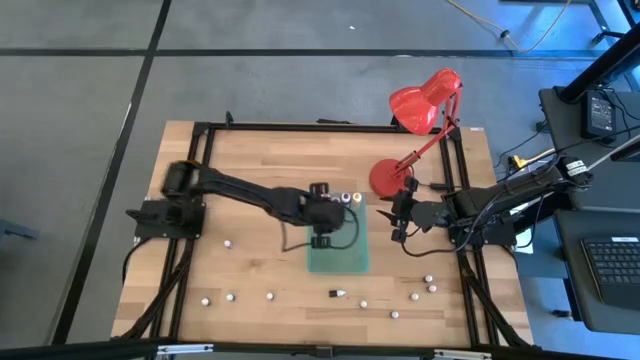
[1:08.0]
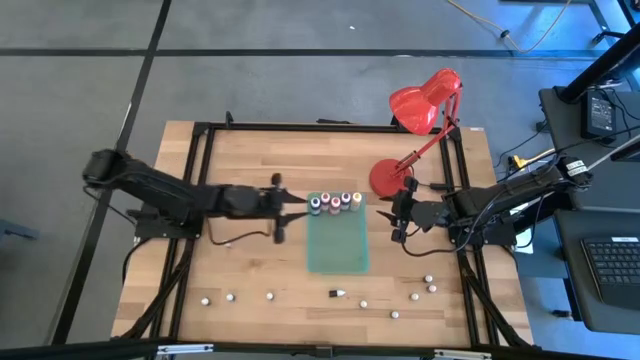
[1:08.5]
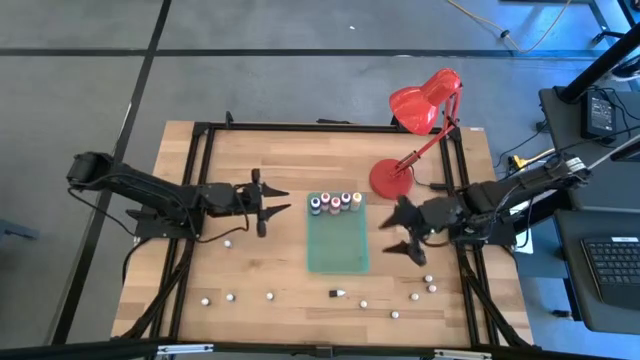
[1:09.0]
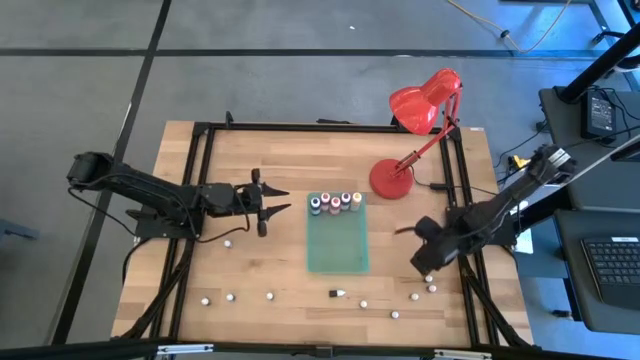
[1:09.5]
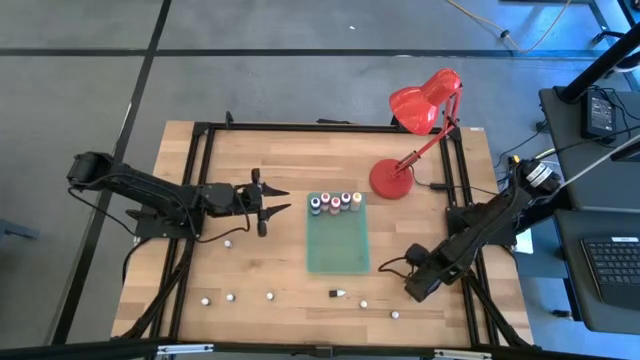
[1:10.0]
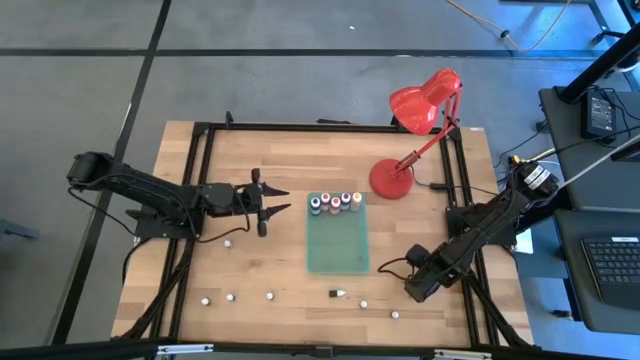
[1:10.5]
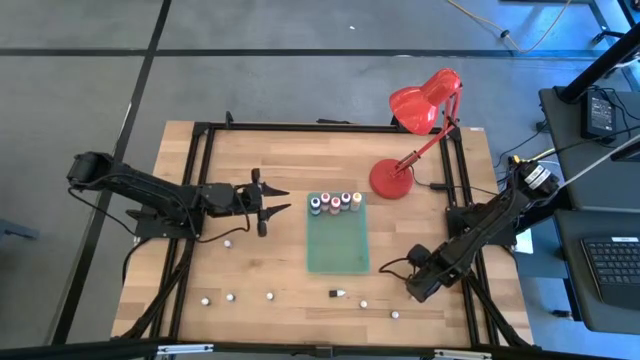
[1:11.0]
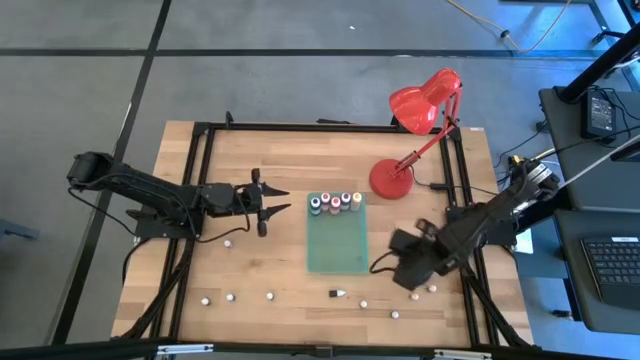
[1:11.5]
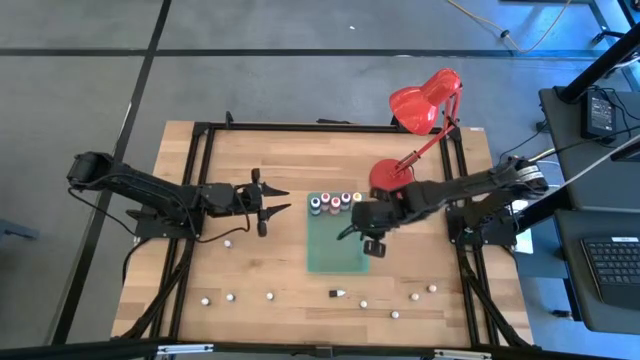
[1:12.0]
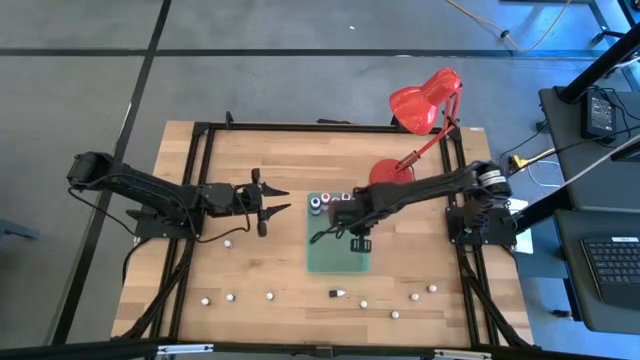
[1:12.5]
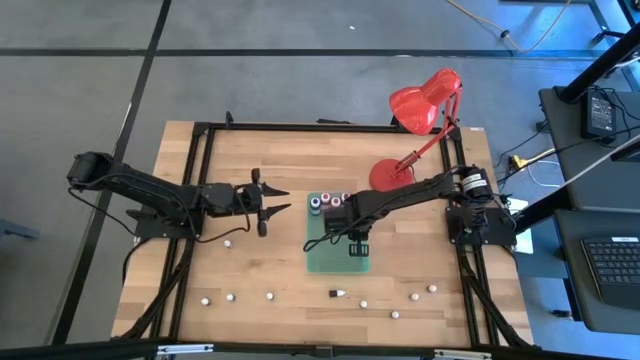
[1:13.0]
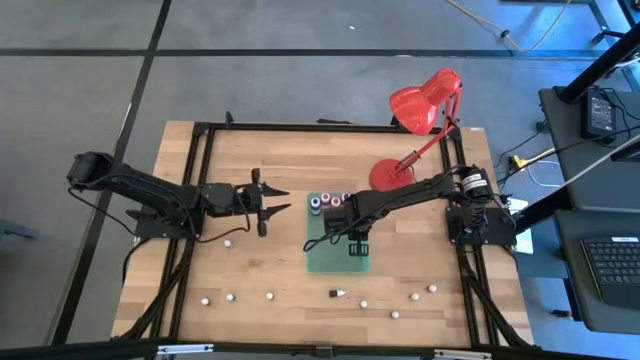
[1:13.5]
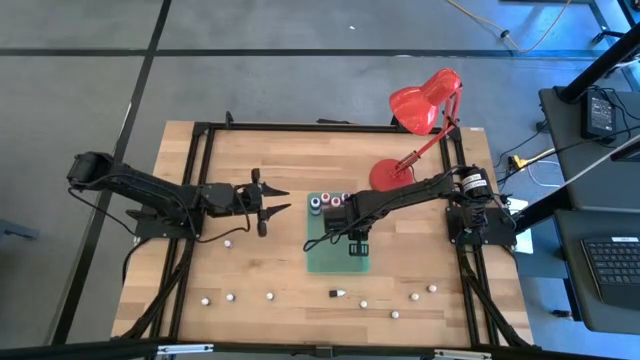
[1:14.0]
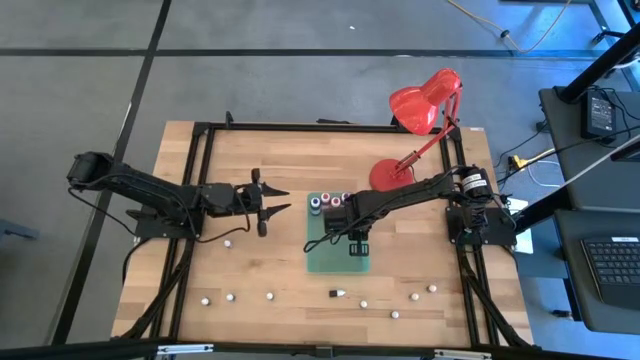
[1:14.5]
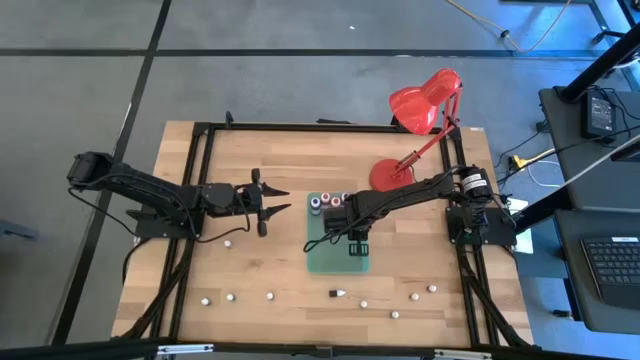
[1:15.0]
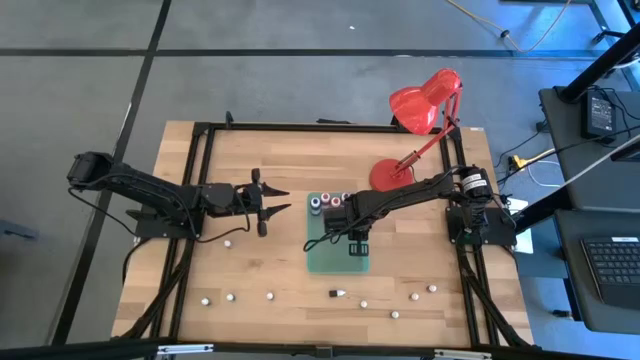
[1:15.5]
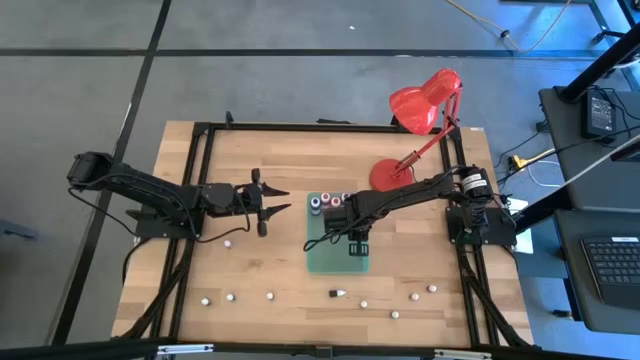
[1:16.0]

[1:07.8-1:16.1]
Task: Pick & Place food coloring
Put the middle small red food coloring bottle into the green bin

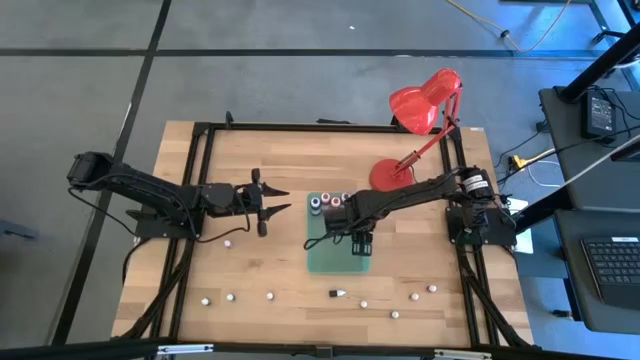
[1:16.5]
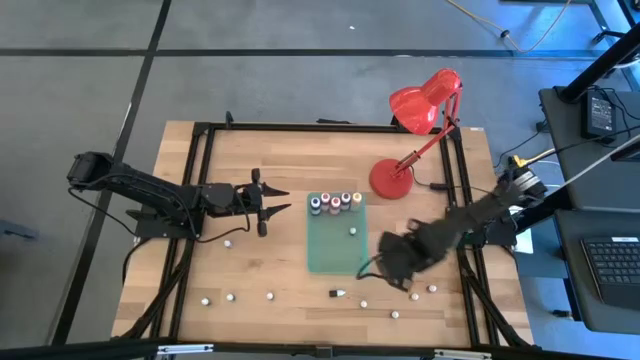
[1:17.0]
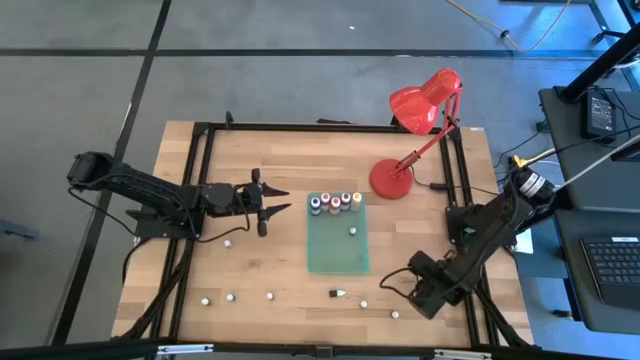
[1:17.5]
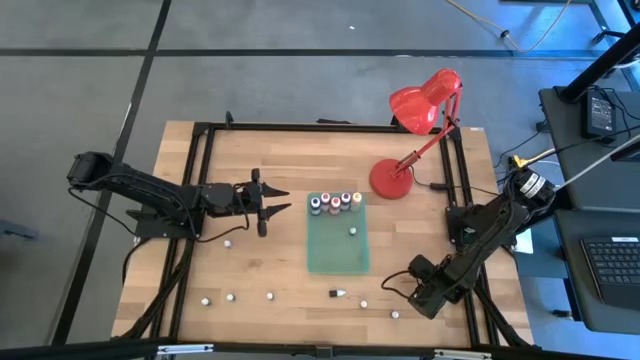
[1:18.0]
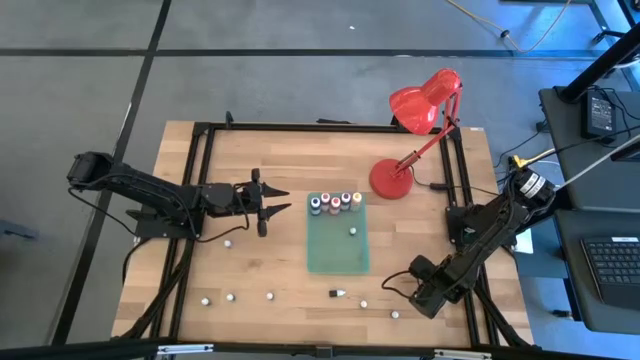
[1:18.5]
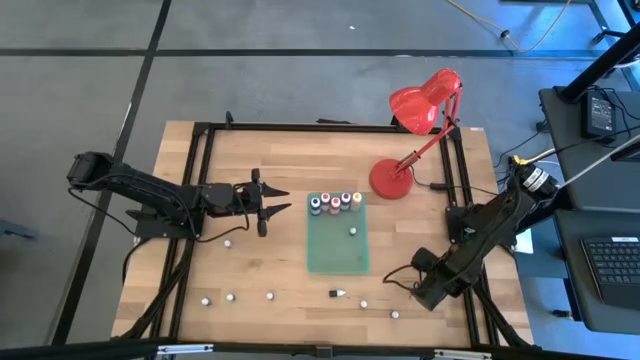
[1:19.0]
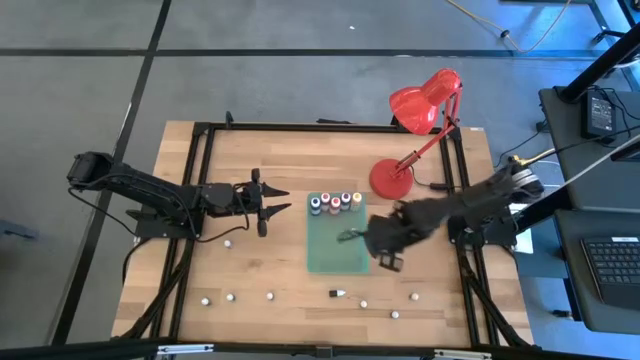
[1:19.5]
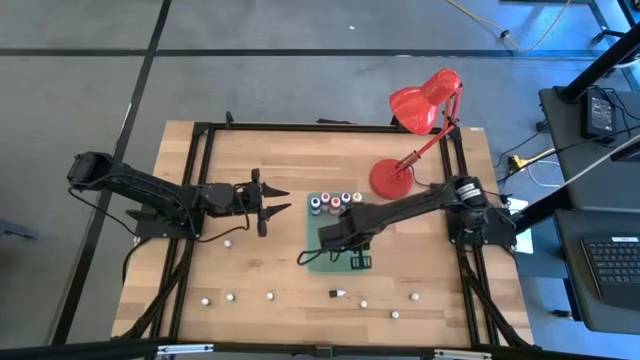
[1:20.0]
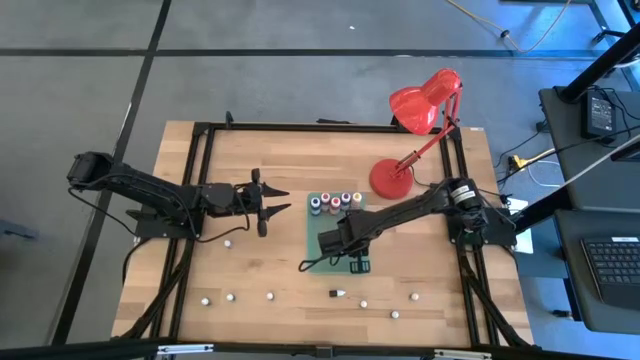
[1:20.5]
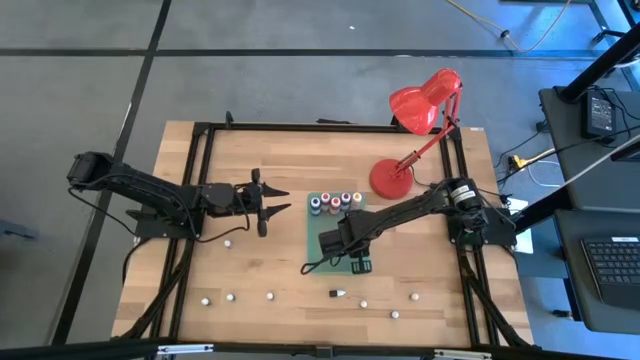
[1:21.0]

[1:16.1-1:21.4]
Put the small pink food coloring bottle into the green bin

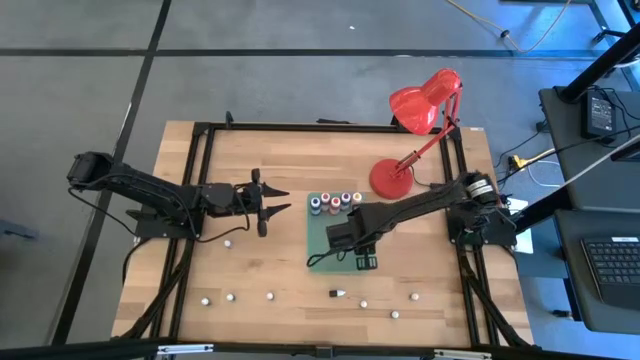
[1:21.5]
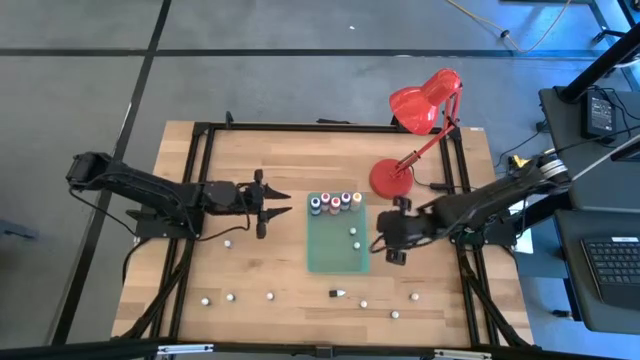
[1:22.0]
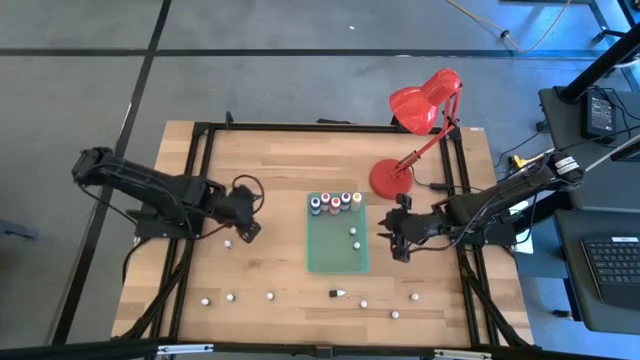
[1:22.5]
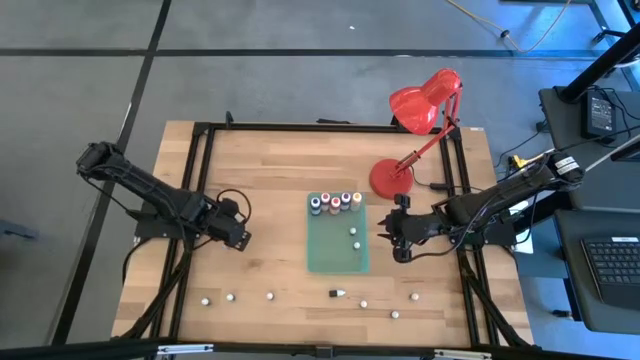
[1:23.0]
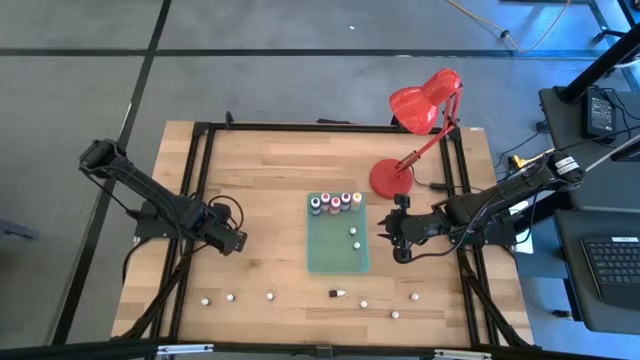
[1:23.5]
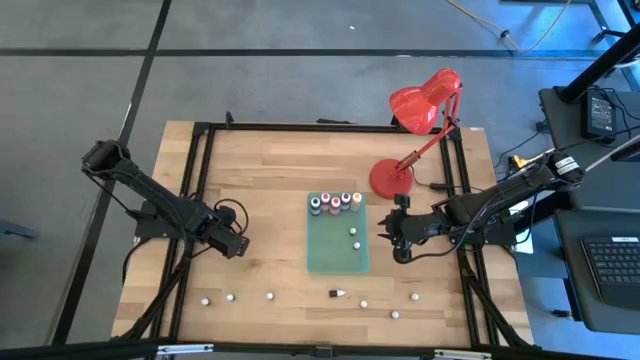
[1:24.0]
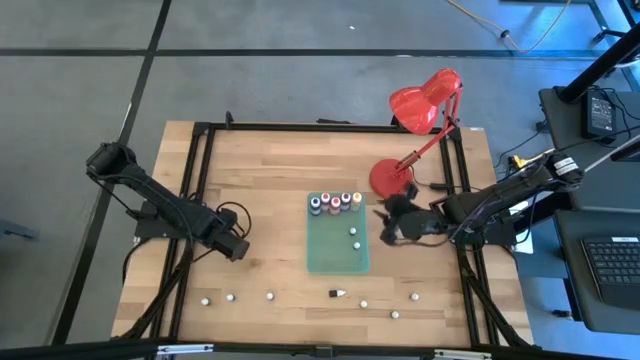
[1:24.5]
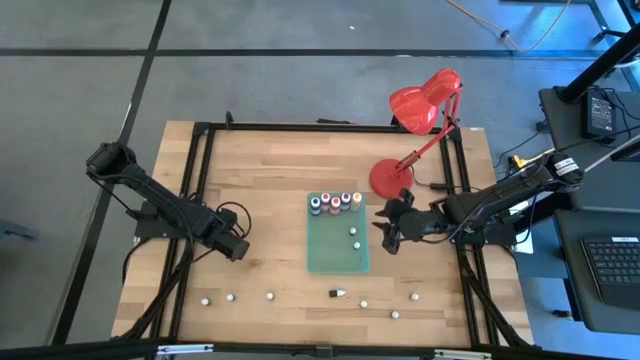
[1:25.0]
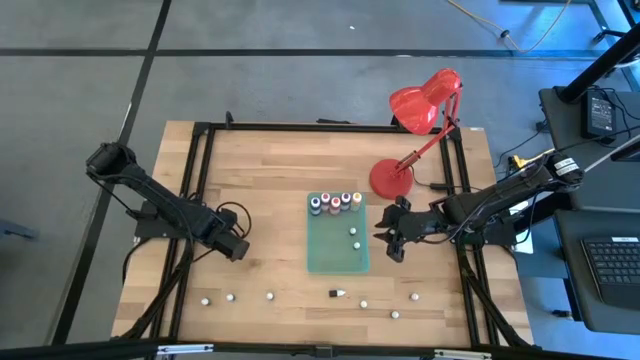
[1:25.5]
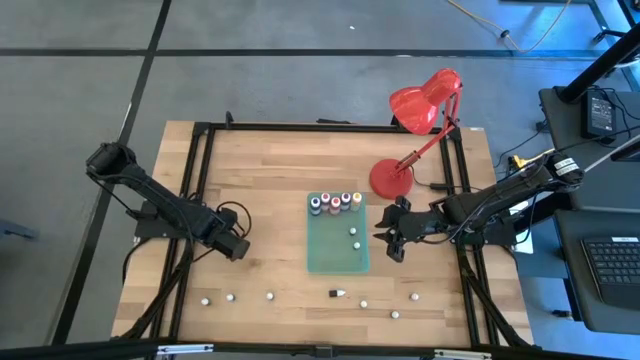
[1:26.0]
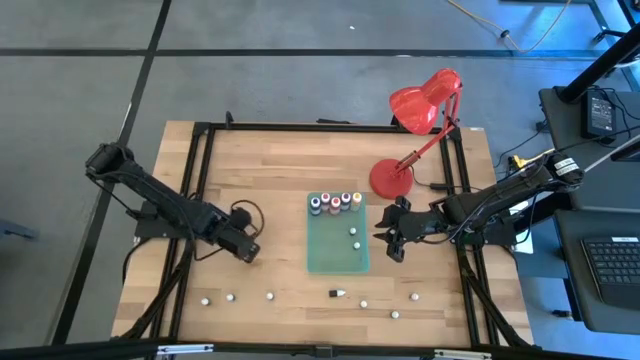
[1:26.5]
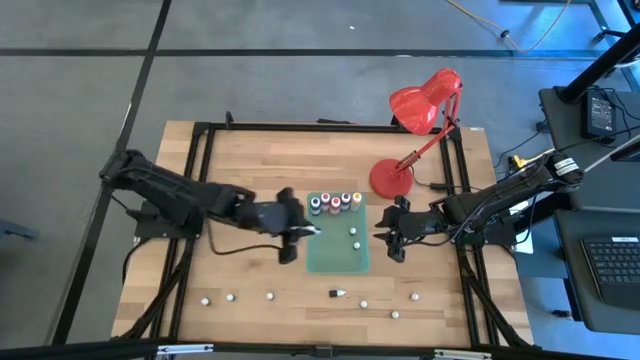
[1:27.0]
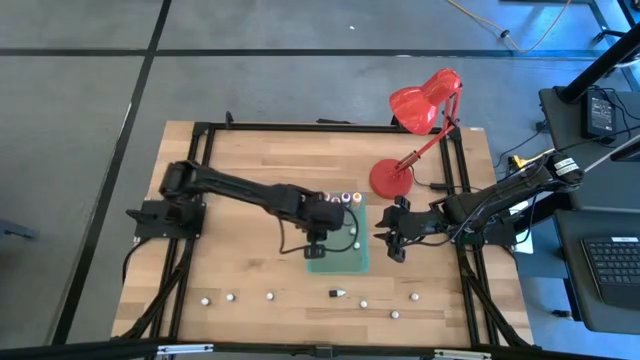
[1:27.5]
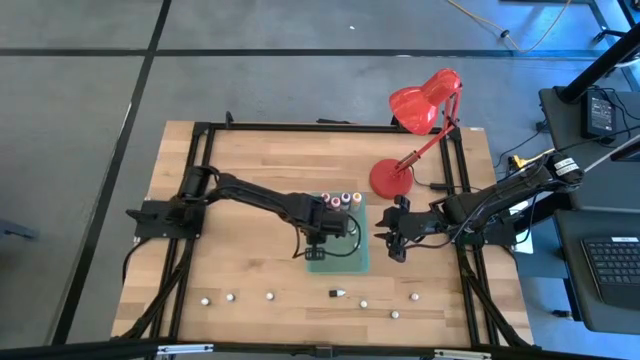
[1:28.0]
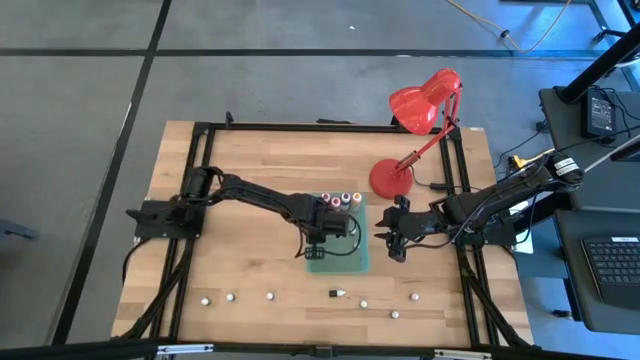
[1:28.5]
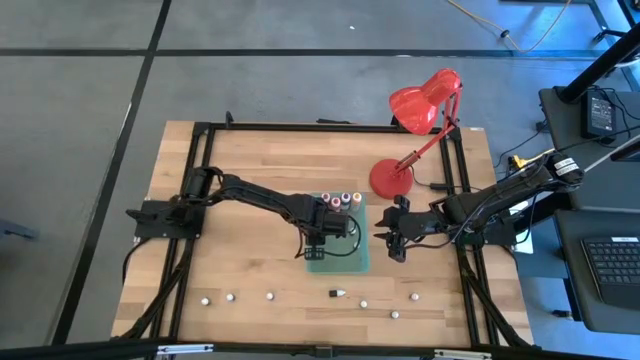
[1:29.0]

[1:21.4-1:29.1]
Put the top small red food coloring bottle into the green bin
